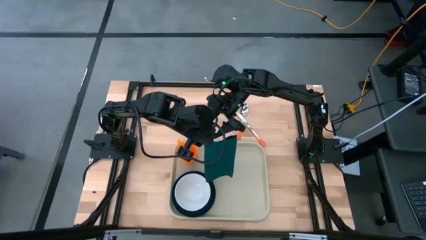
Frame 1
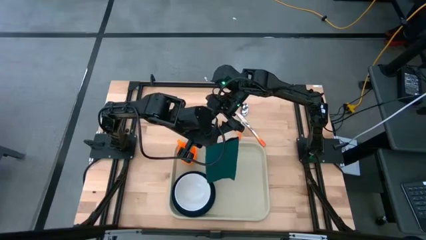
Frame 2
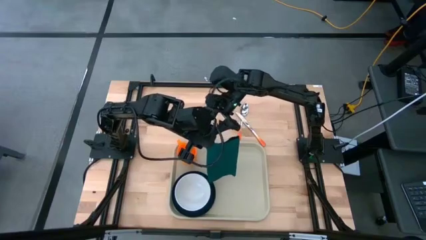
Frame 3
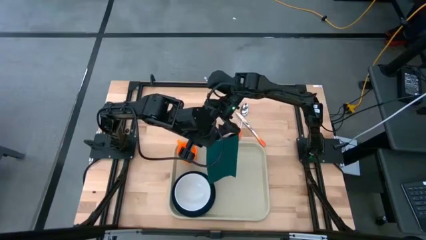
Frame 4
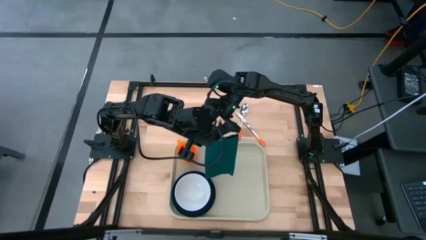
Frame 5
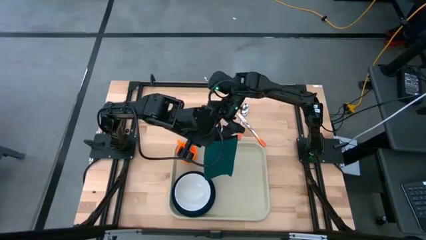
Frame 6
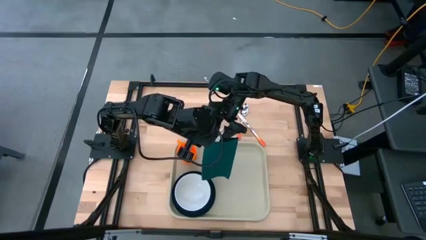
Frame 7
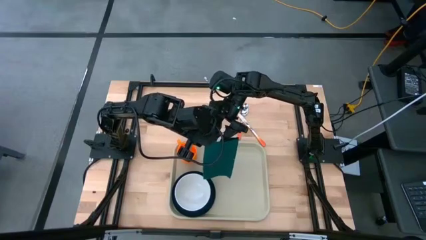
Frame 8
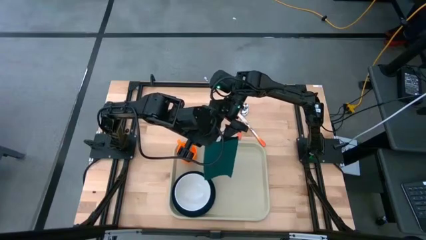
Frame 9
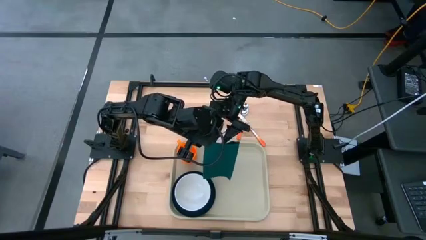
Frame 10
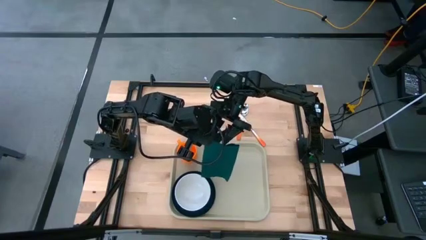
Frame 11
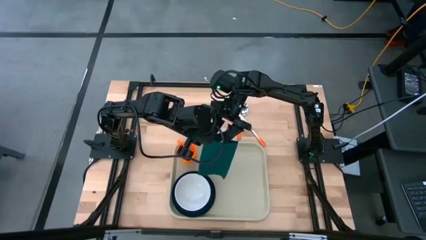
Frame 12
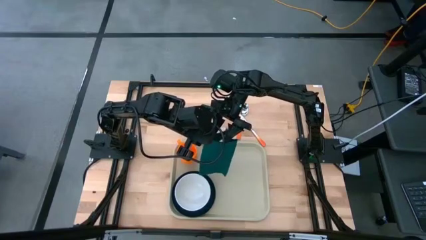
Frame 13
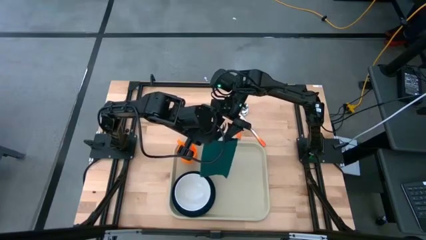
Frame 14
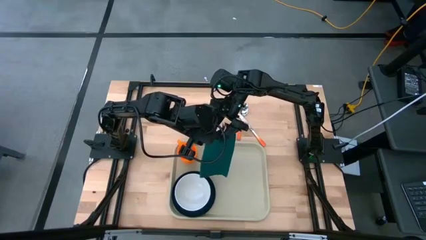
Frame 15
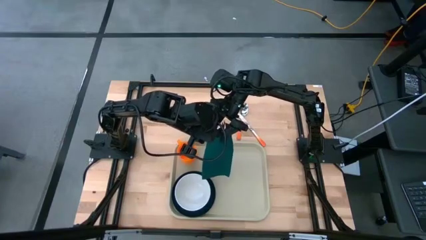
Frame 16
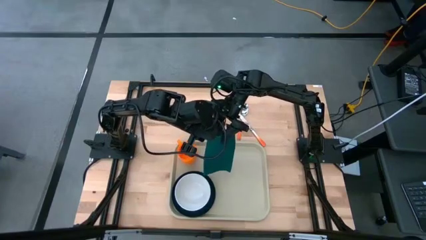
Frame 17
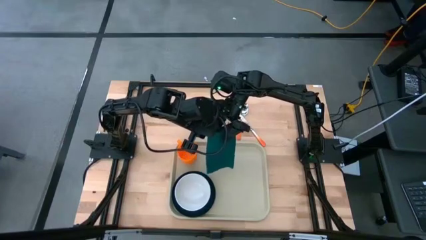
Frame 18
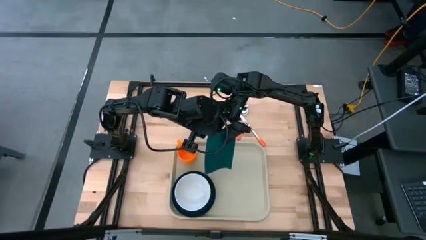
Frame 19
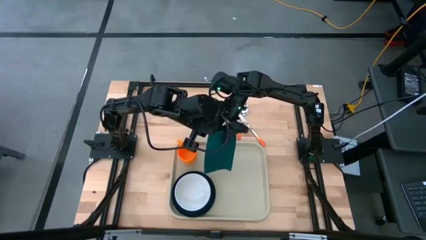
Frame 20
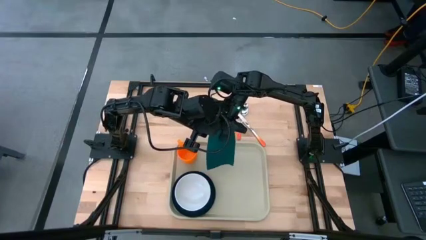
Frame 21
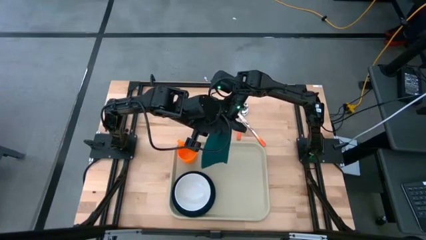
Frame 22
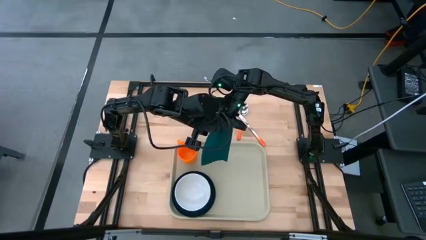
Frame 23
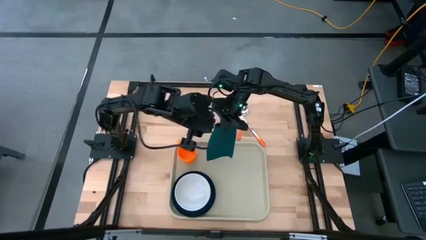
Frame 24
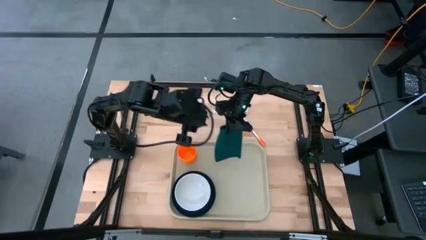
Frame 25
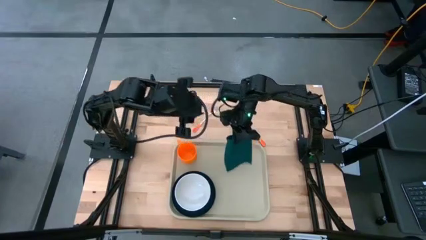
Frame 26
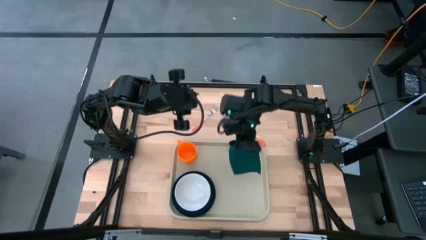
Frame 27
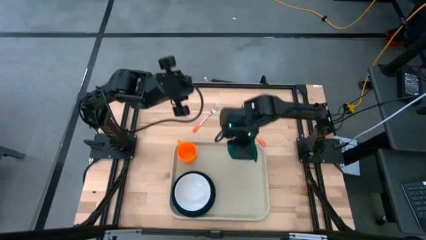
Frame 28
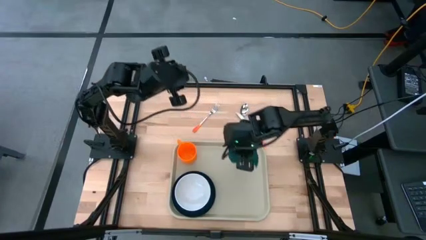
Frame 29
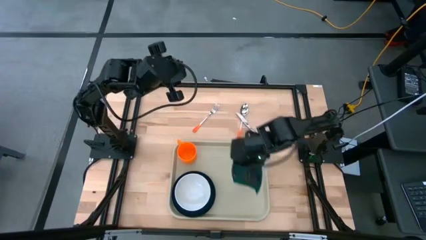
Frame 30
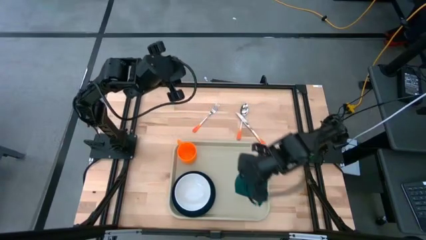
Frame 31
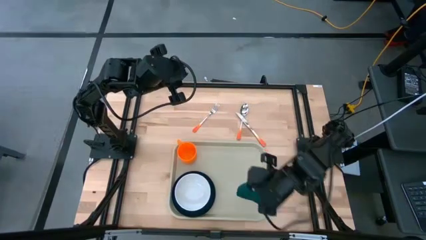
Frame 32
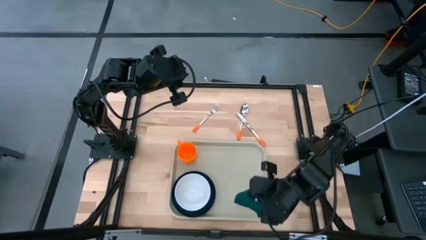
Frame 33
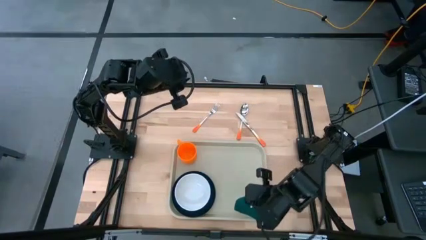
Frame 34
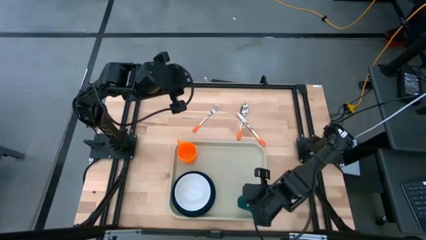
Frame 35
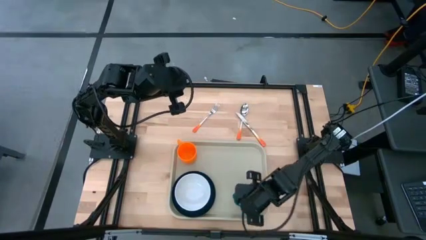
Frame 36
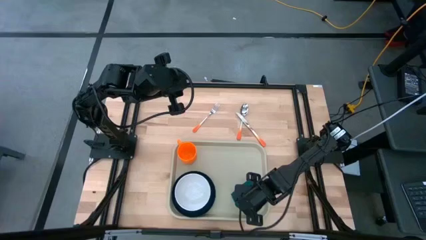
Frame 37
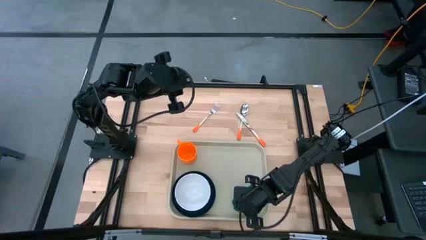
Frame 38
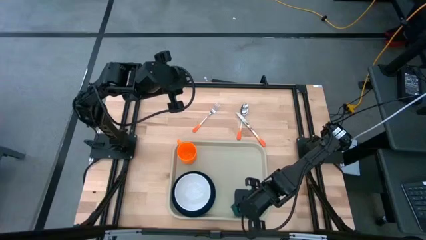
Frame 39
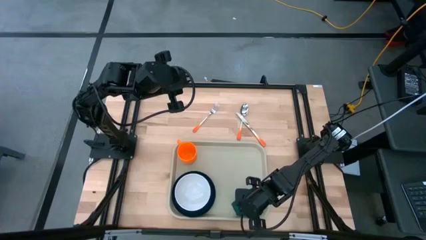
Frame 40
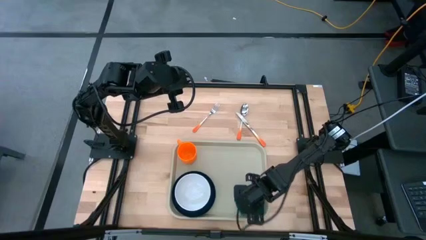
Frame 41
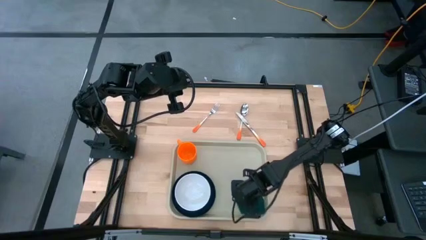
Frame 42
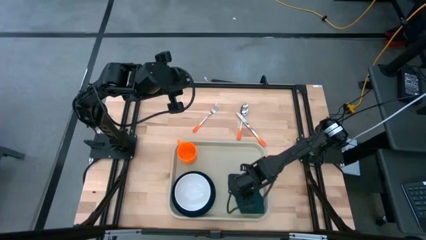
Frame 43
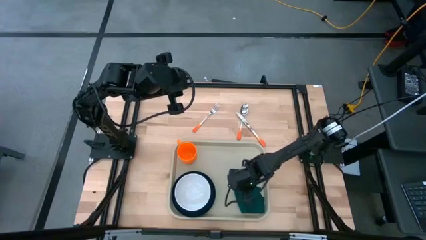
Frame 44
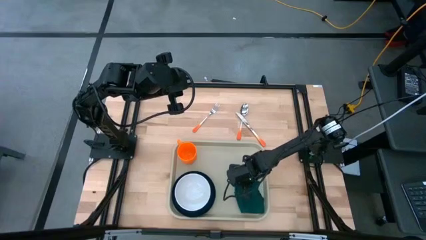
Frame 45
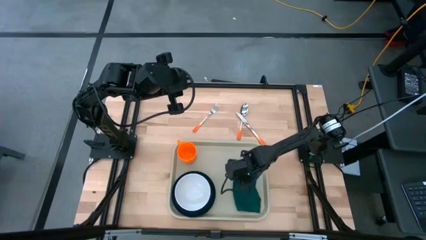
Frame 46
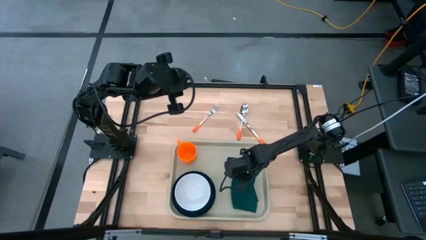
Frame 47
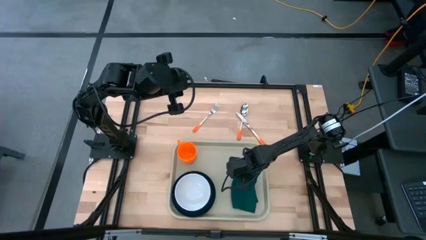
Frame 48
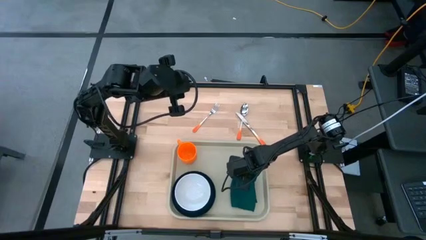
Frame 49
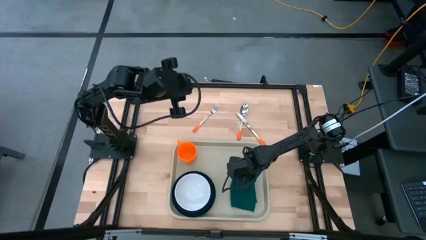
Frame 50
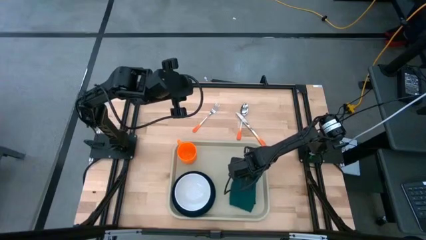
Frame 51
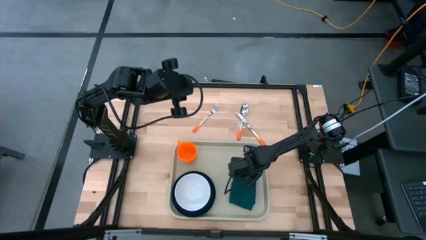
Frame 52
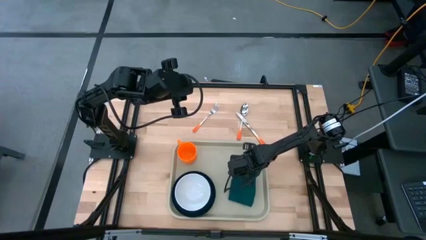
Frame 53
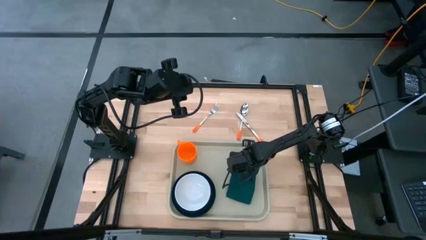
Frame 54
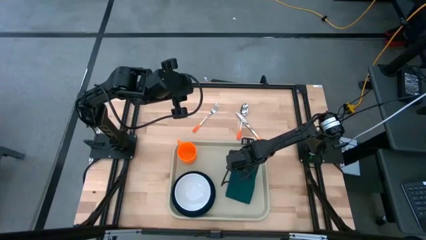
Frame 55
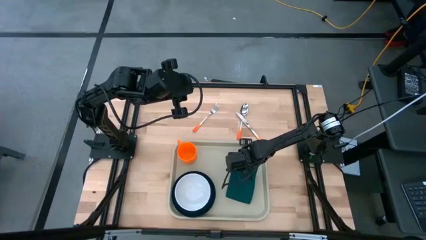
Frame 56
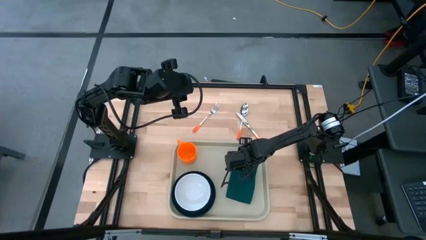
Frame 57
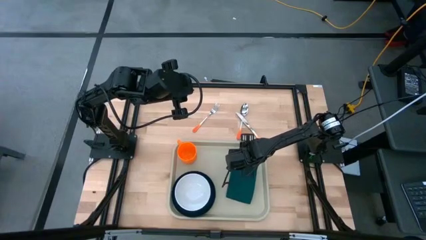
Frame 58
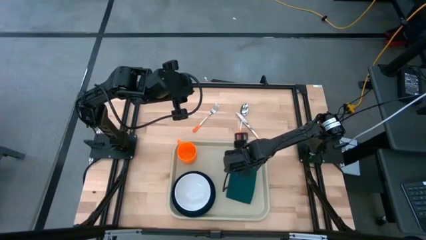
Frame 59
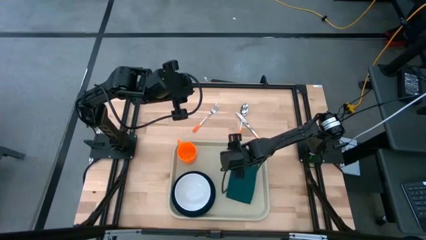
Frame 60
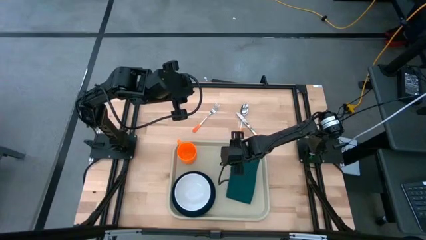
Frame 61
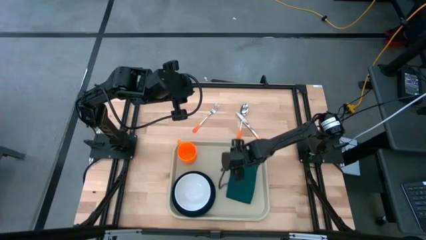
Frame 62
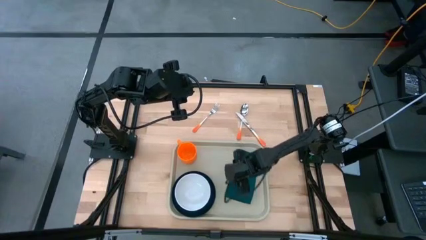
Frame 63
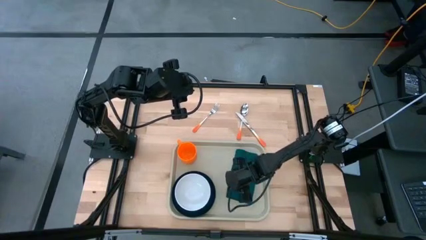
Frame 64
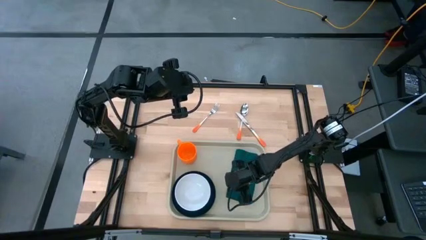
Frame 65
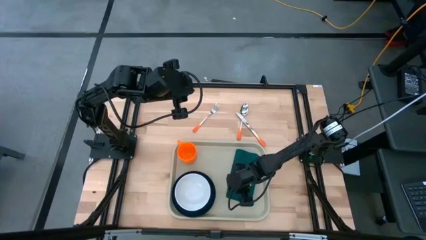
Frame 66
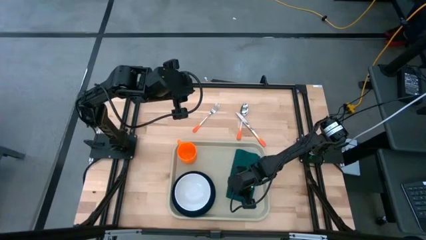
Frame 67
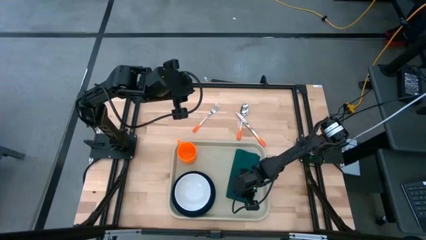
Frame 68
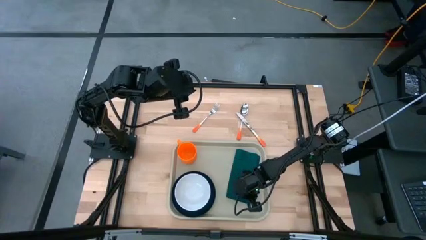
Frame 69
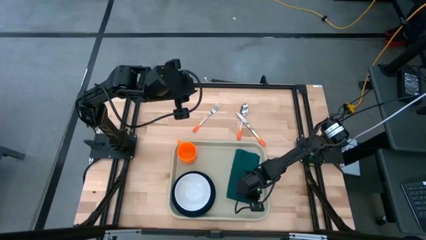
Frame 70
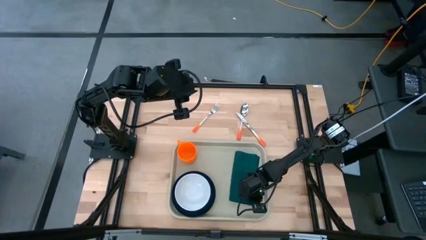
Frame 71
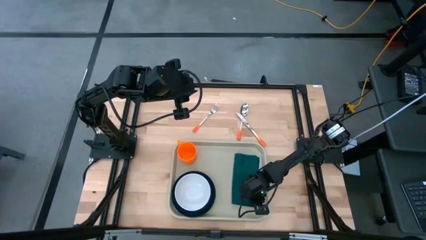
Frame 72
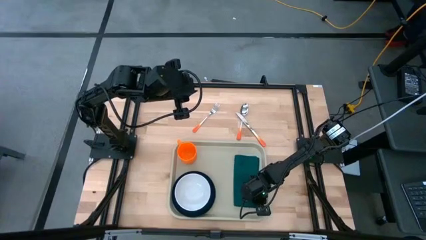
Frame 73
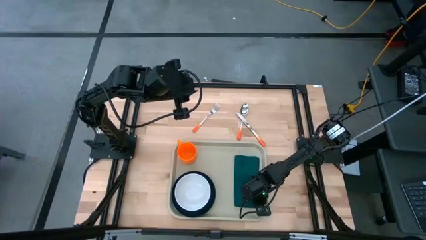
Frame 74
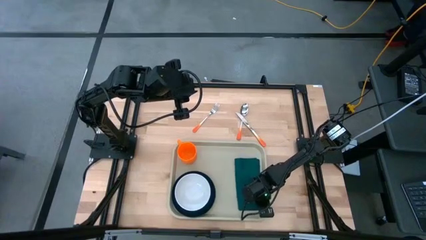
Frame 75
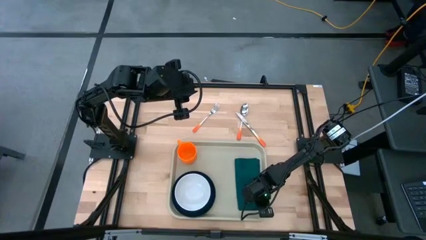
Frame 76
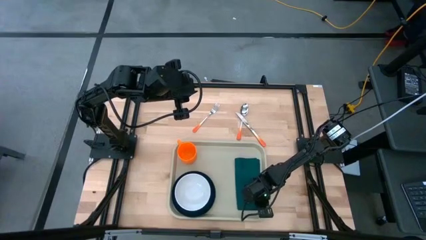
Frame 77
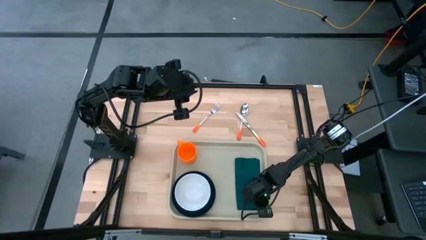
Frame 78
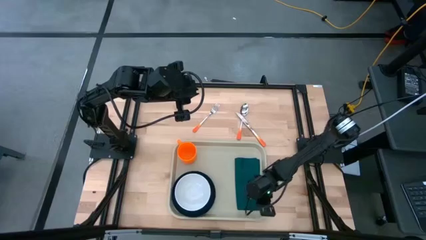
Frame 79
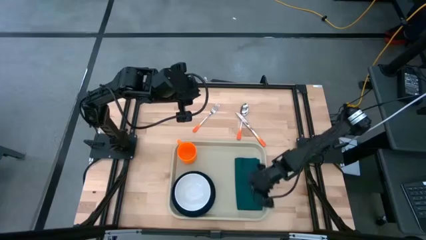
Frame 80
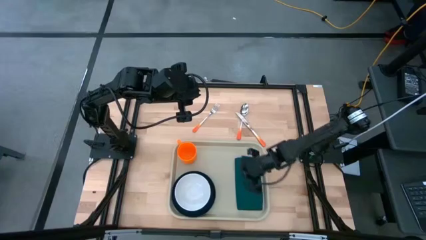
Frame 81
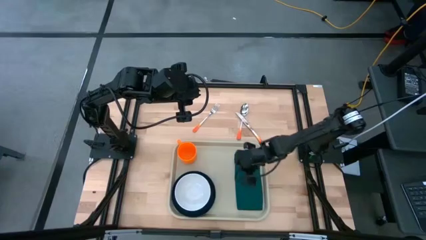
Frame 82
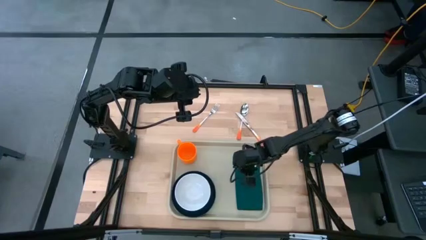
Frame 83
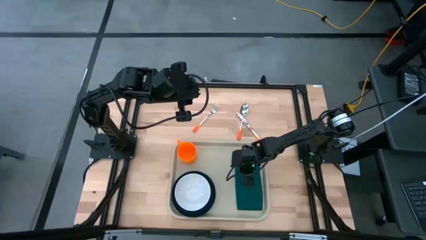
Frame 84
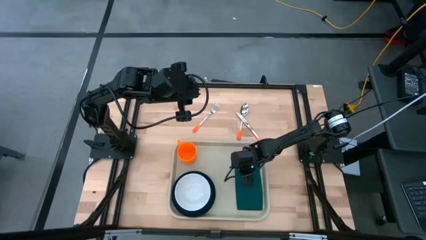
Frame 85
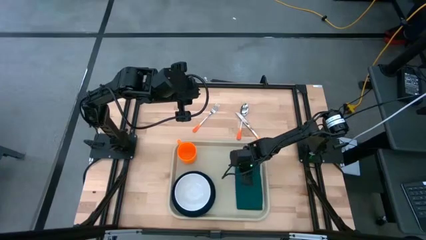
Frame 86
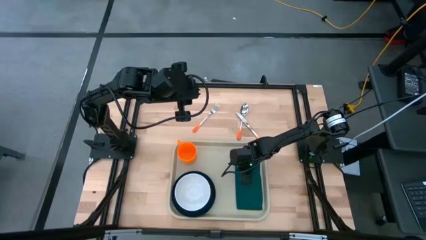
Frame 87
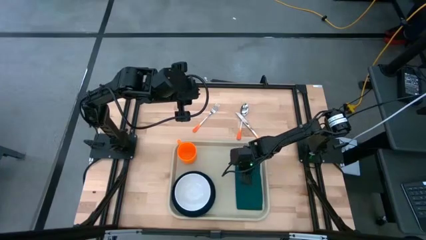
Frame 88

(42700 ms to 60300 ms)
Task: Set up tray
Put the napkin on the tray to the right of the plate
